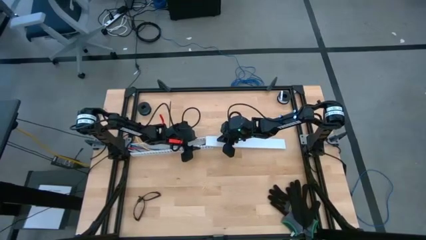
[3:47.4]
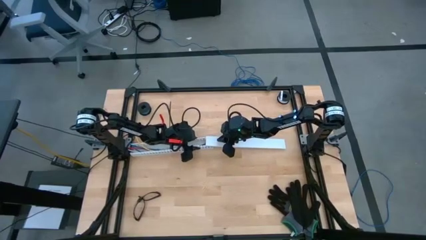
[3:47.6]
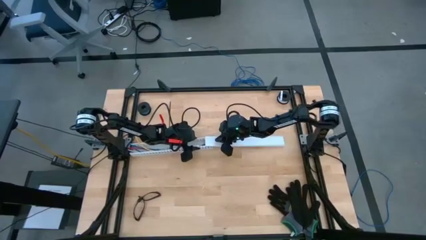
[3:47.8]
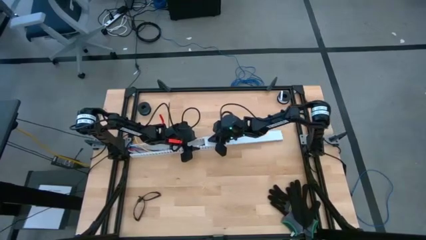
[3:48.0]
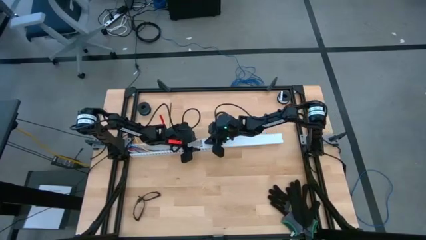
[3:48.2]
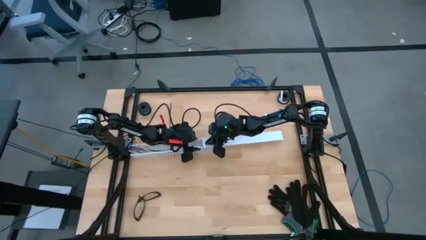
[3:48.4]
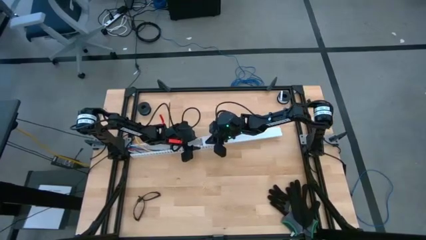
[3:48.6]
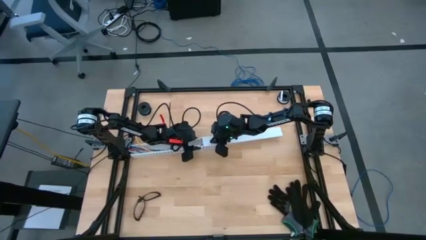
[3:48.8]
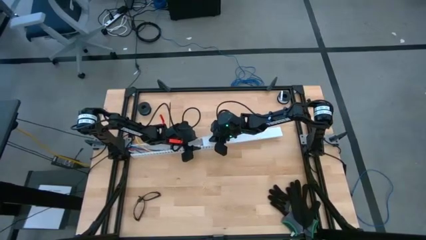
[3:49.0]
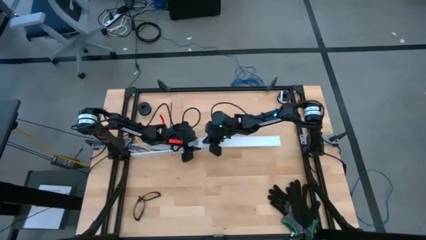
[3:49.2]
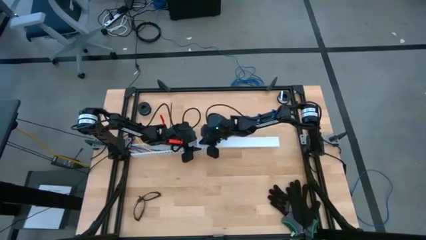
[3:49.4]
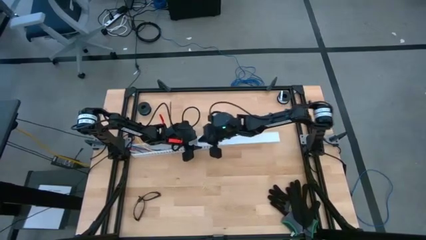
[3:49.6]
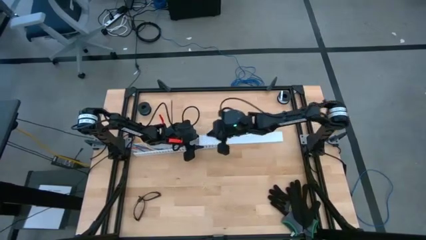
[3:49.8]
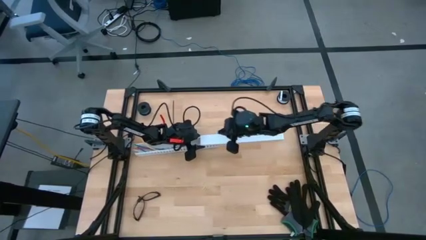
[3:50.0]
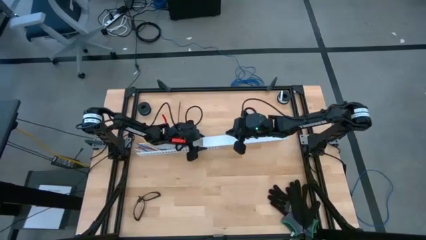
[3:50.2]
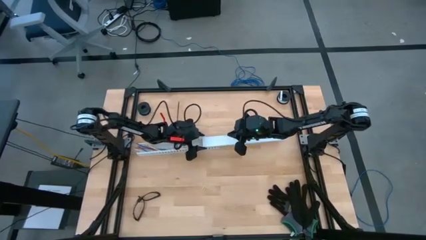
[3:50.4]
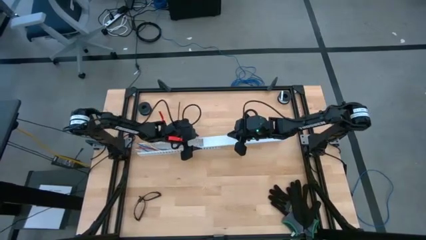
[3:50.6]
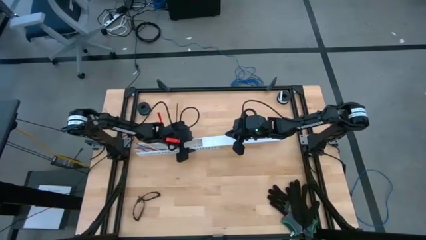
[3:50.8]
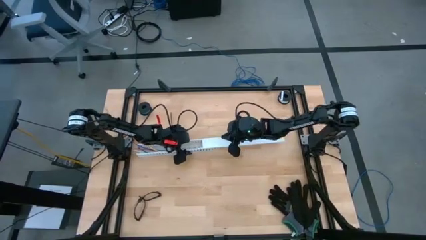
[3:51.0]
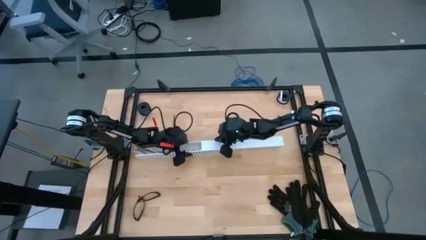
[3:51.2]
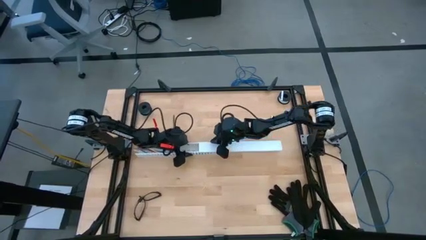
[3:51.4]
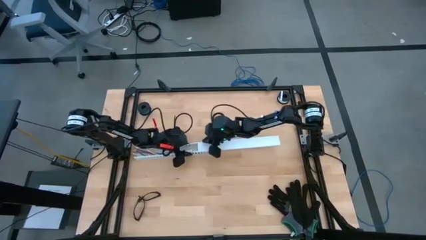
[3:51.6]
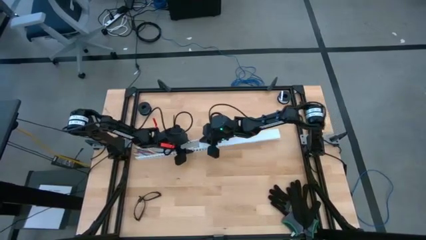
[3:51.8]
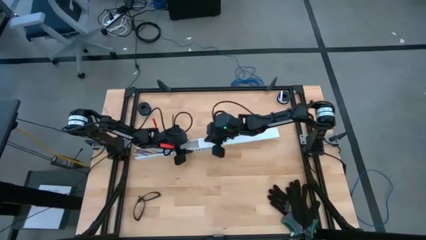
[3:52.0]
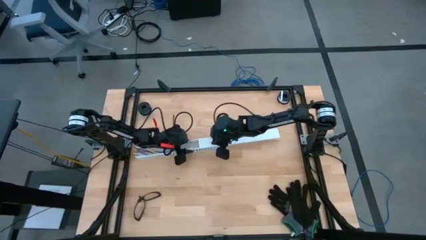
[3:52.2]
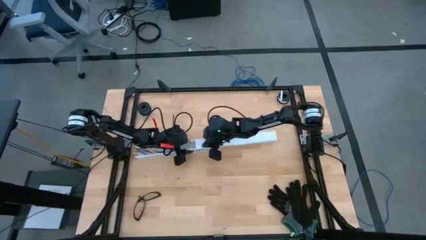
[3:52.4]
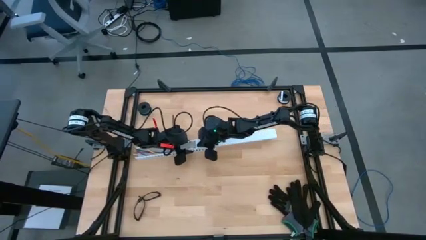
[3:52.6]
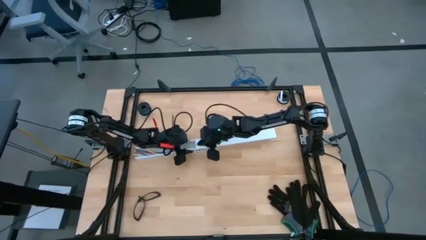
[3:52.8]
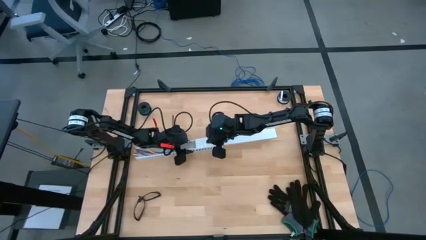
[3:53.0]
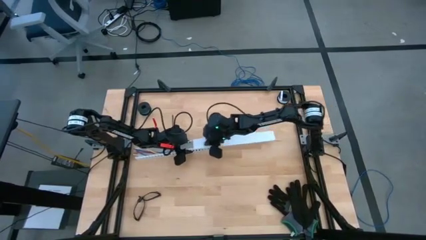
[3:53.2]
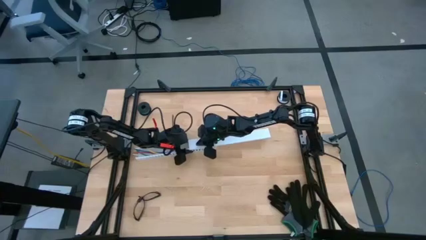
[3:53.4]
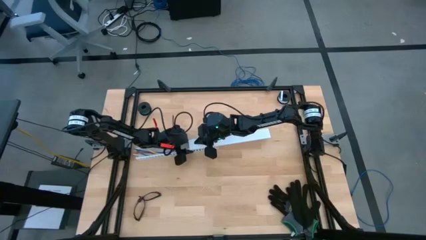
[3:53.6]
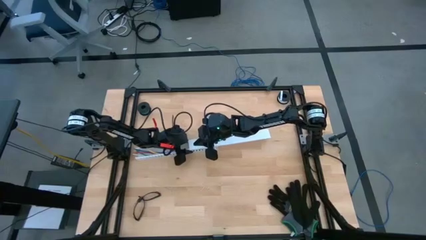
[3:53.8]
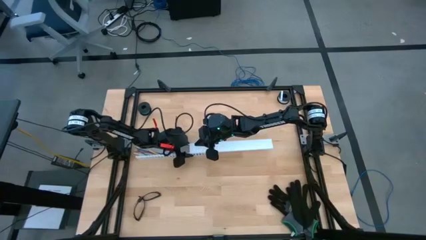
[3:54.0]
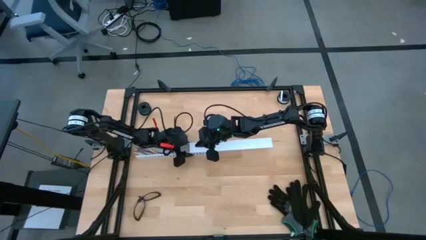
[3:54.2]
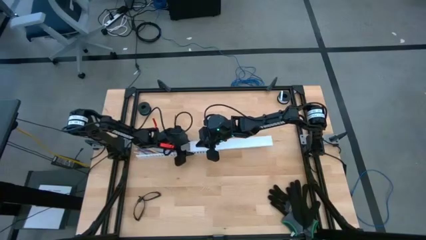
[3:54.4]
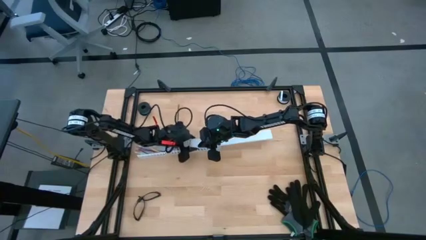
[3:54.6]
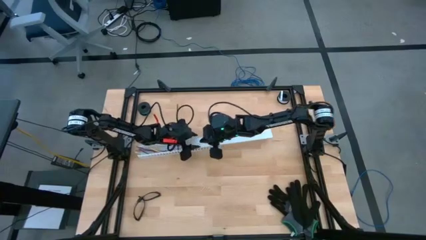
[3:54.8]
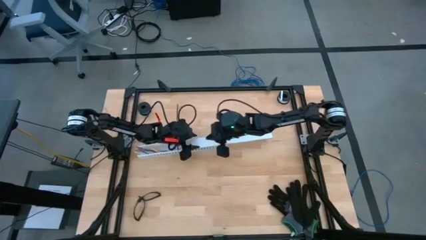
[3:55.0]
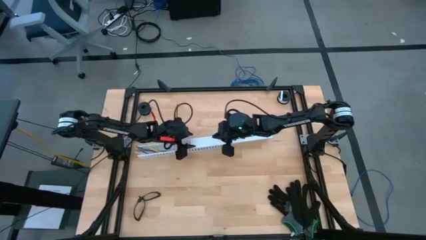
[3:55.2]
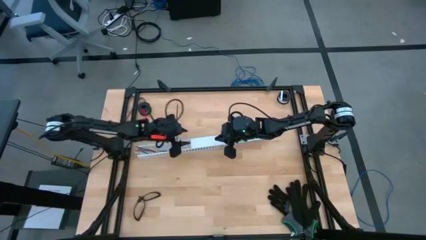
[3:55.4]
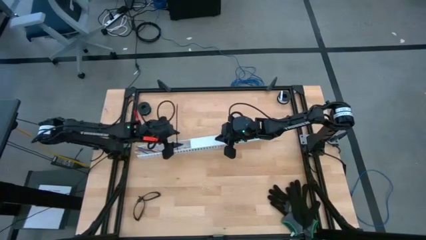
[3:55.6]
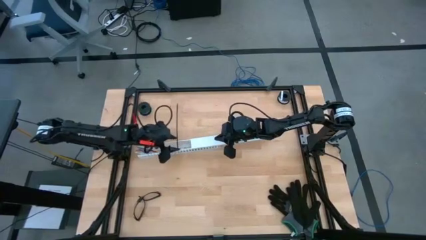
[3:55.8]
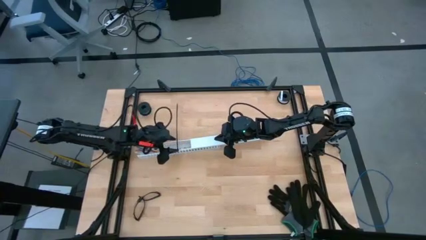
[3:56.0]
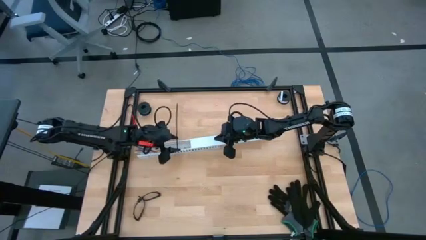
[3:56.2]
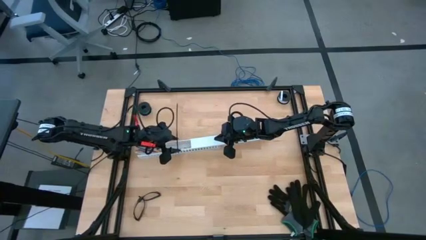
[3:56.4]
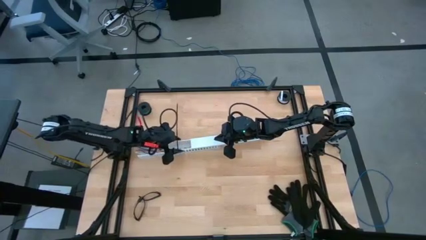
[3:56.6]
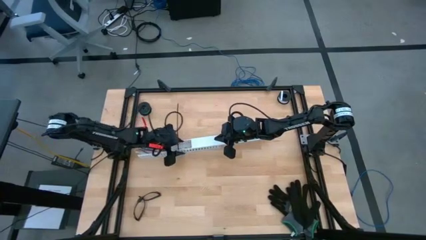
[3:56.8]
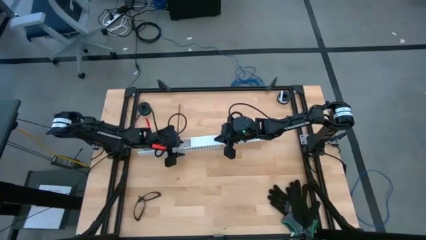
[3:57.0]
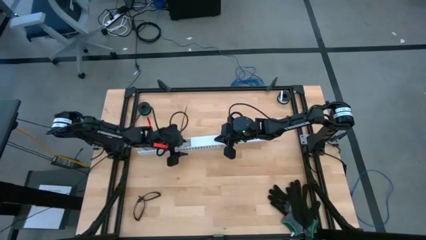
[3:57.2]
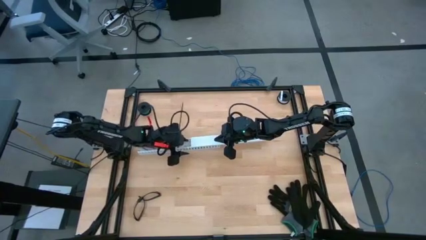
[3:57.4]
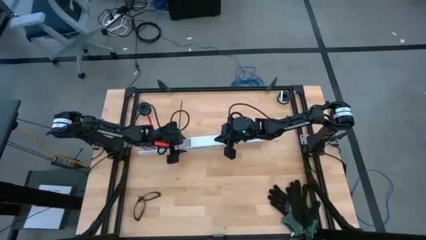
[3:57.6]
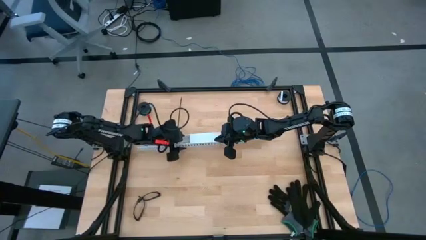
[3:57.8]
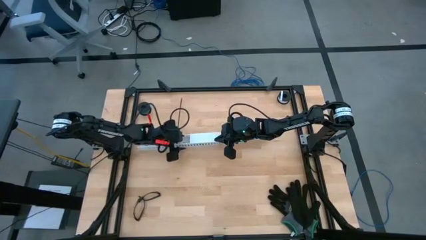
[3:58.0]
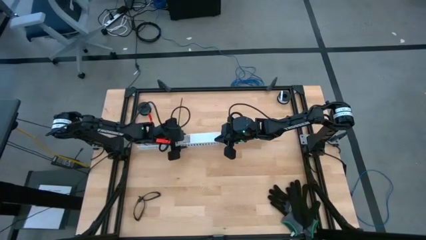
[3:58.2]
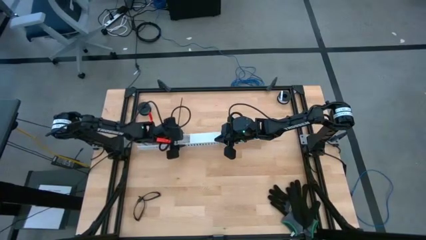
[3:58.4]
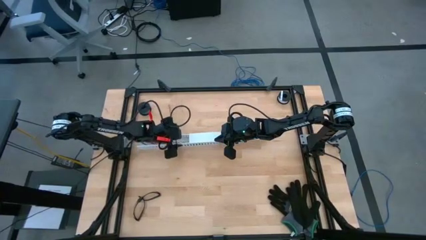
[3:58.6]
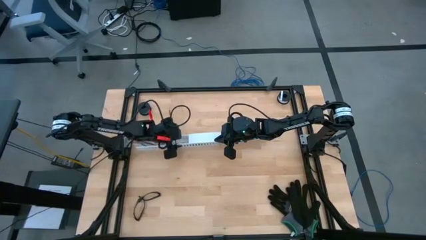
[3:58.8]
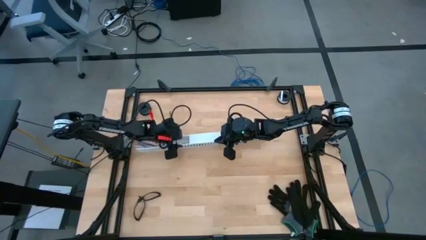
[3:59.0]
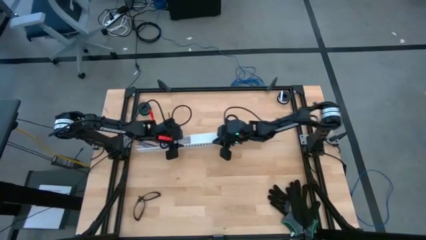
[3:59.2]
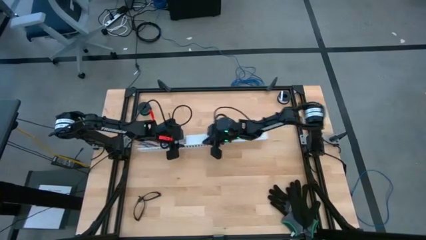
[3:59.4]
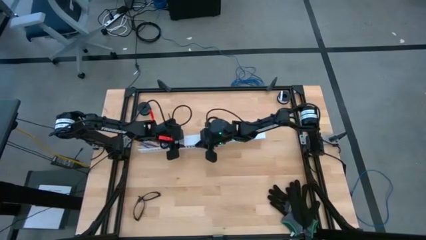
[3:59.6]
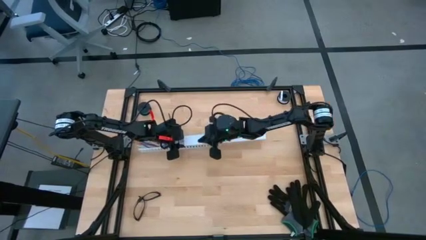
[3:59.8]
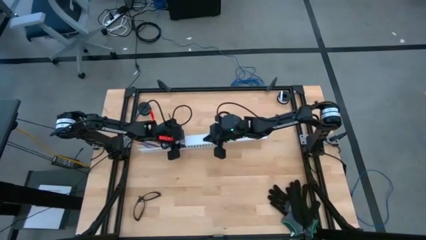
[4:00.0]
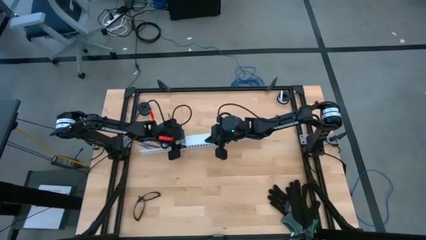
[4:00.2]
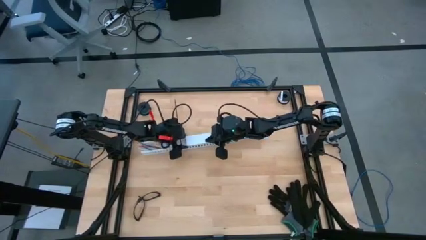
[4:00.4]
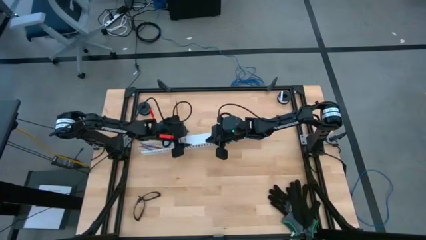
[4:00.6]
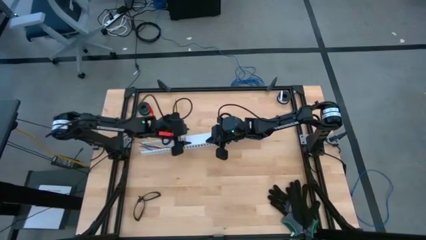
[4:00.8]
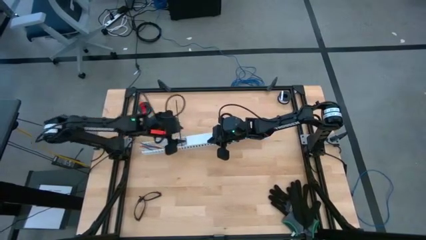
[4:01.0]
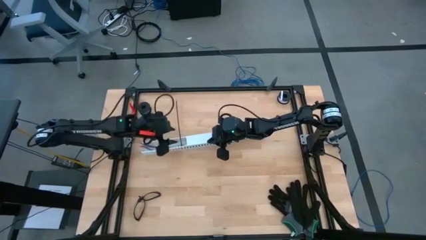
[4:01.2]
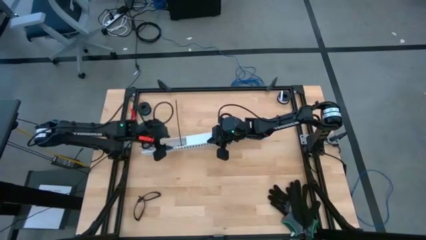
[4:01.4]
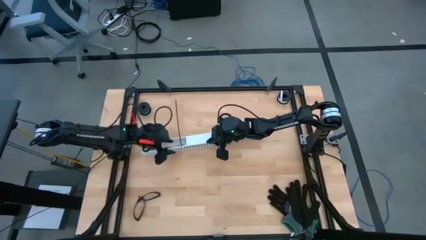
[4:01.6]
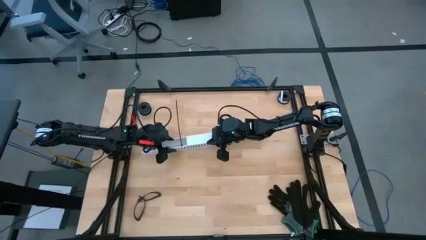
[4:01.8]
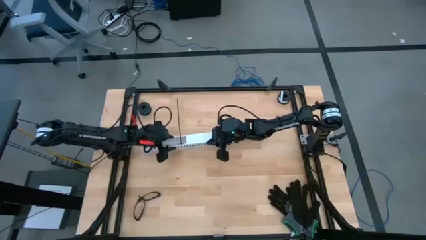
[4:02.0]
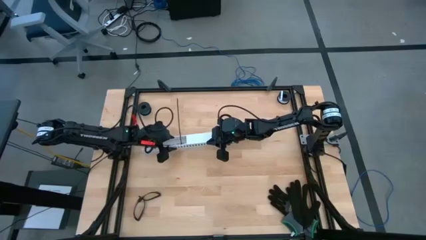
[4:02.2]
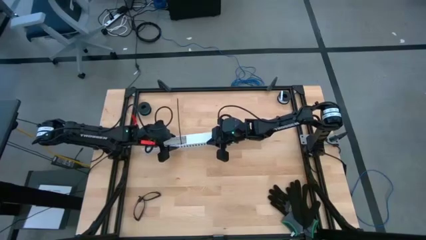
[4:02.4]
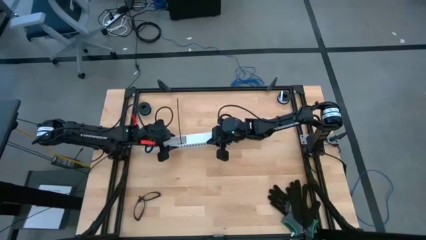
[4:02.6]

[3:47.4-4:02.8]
Task: Ziptie cables
Close the white cable duct using the cover

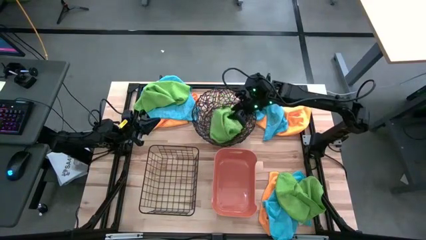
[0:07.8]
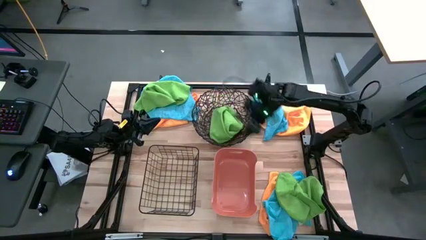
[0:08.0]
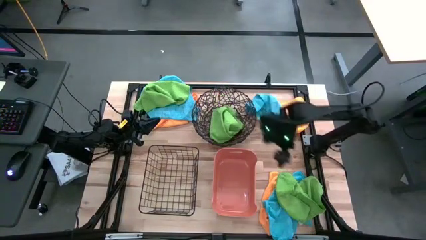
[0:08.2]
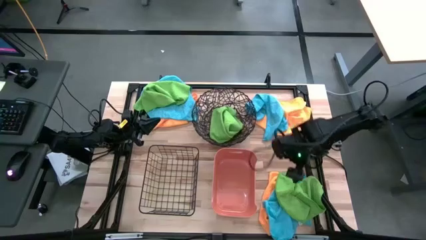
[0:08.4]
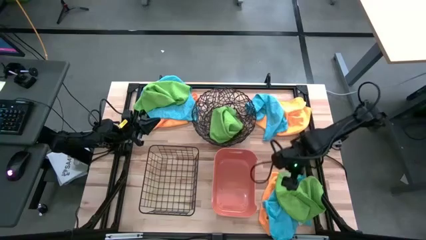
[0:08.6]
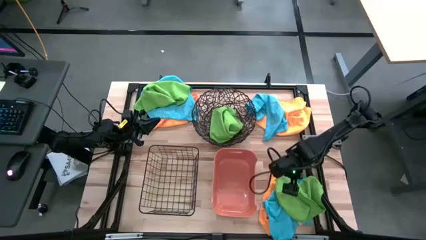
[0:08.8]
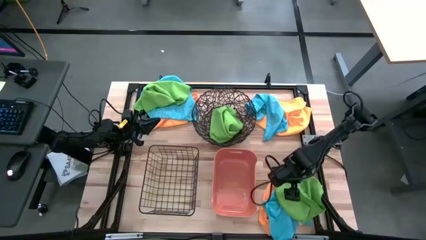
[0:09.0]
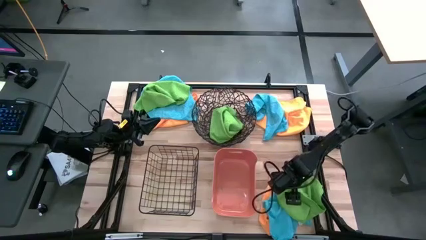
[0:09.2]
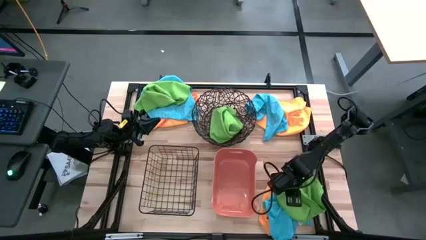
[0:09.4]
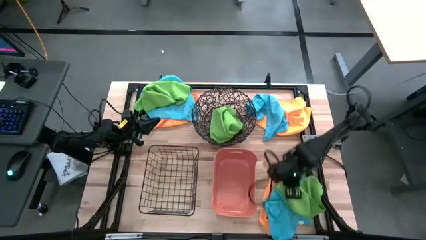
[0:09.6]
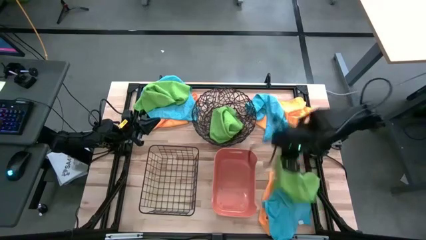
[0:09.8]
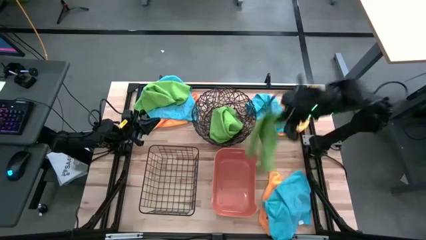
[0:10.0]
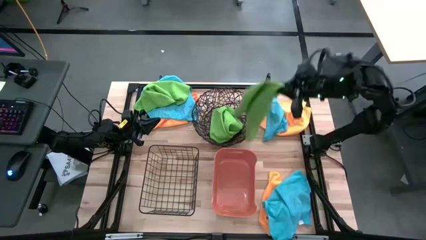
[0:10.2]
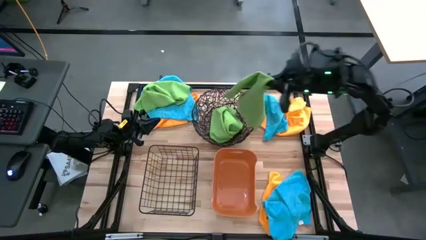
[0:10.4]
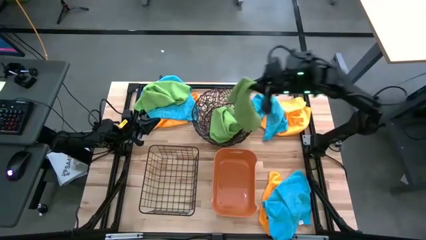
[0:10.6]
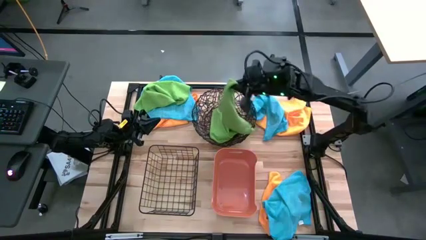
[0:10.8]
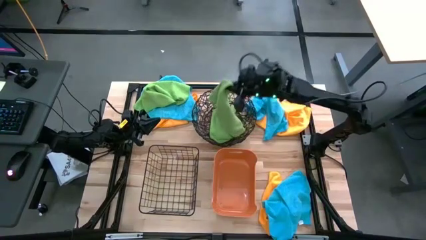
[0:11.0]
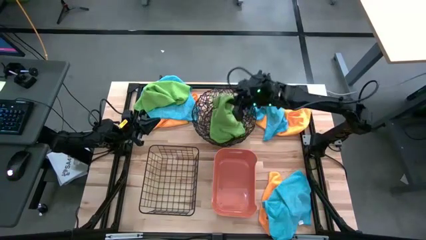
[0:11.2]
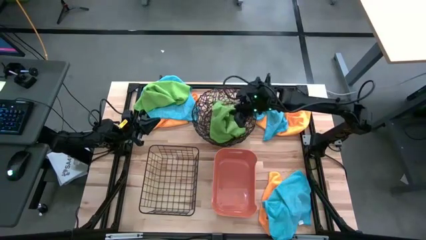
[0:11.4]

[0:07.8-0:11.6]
Task: Sort microfiber towel by color & place in baskets
Put the bottom green microfiber towel into the black woven basket
